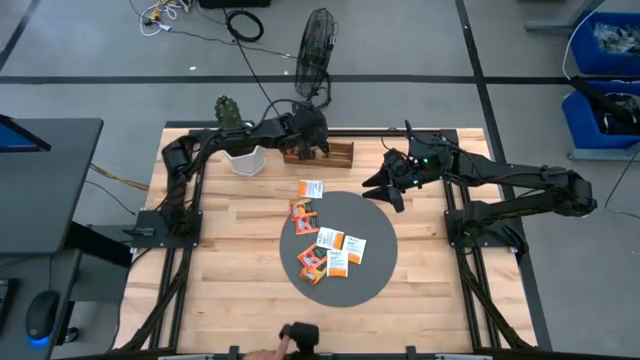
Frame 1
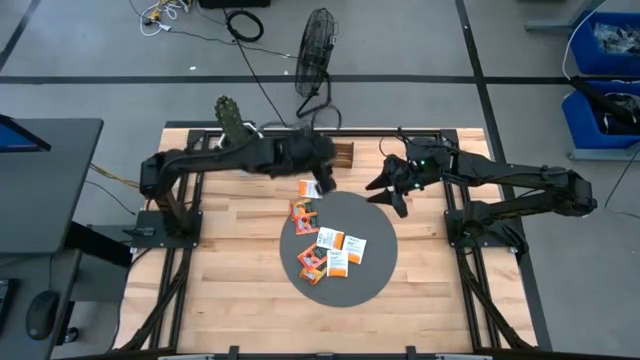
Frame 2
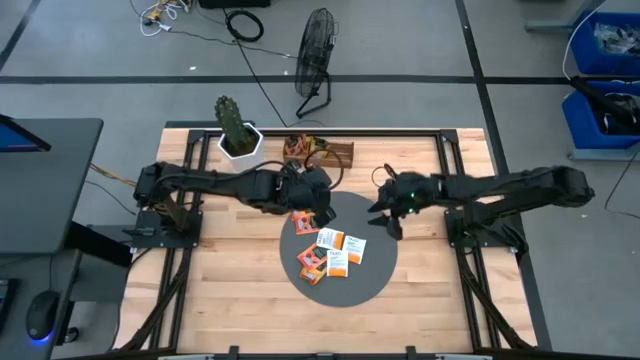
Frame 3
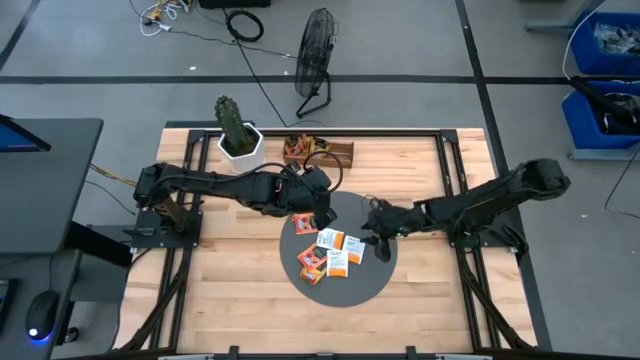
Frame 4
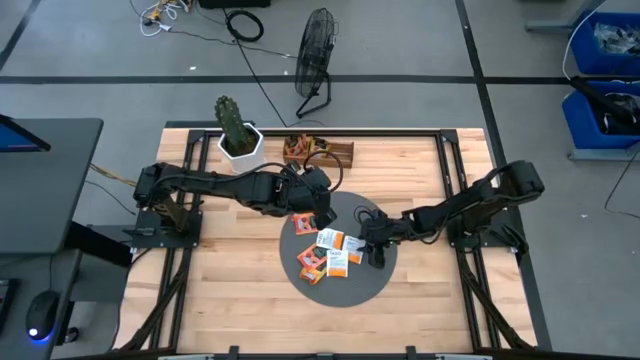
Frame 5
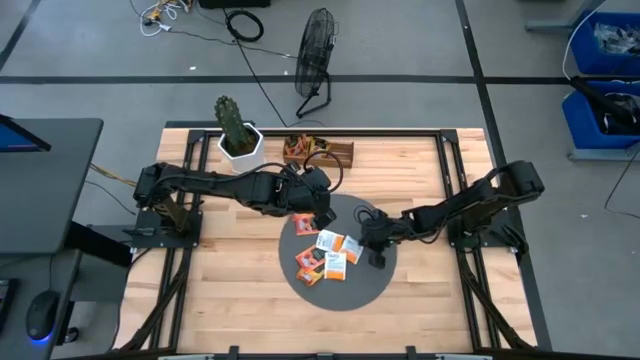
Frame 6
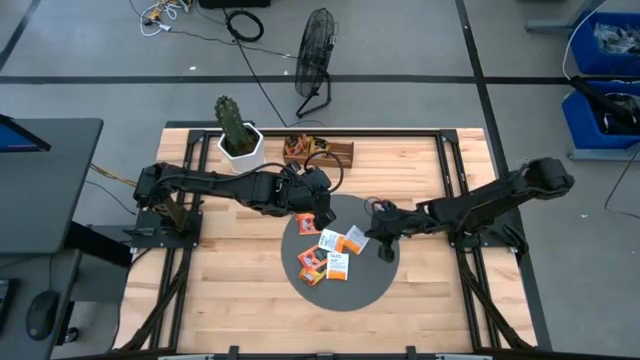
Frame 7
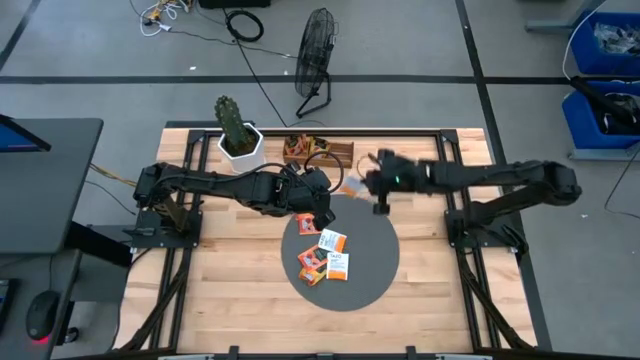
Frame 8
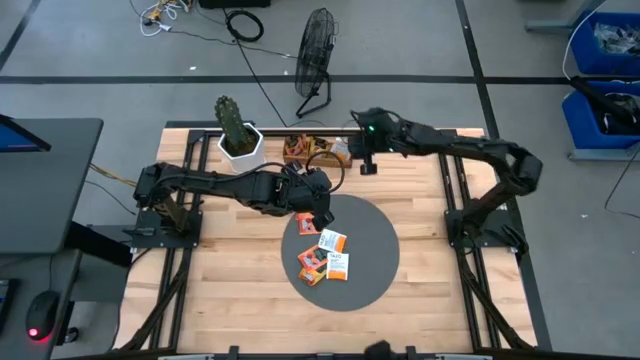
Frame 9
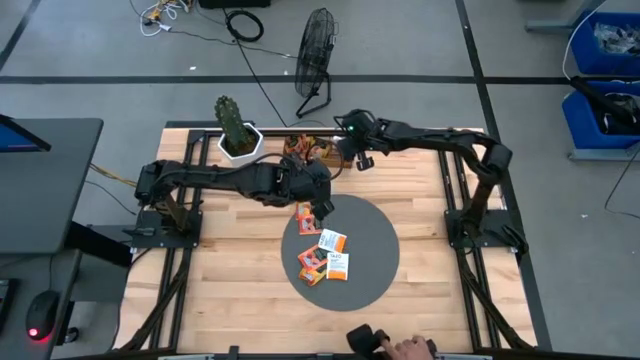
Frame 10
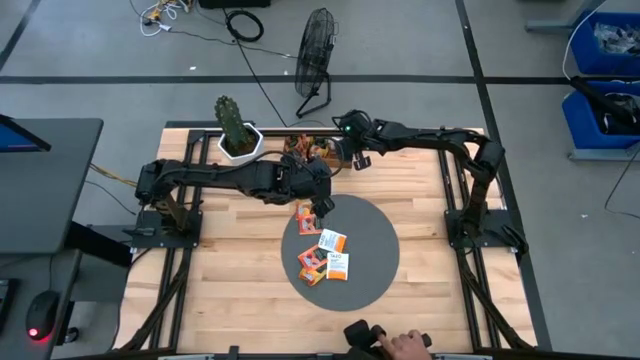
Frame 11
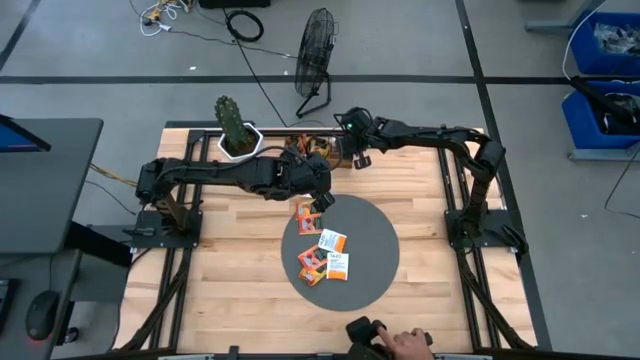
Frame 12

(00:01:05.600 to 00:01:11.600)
Task: Pick & Place Tea
Put the white tea bag into the right section of the wooden organizer

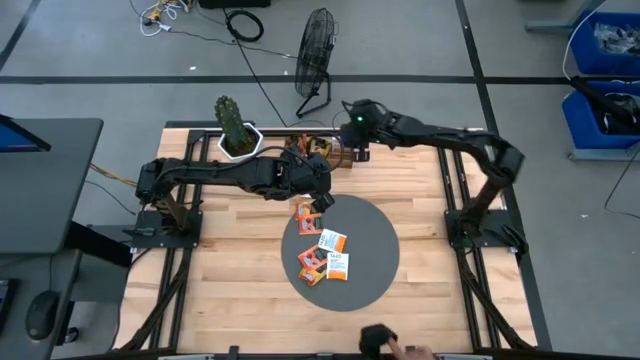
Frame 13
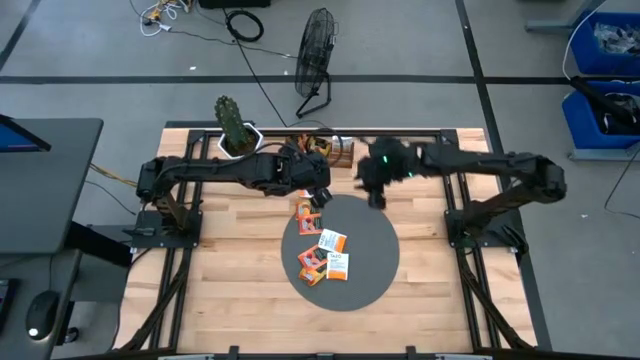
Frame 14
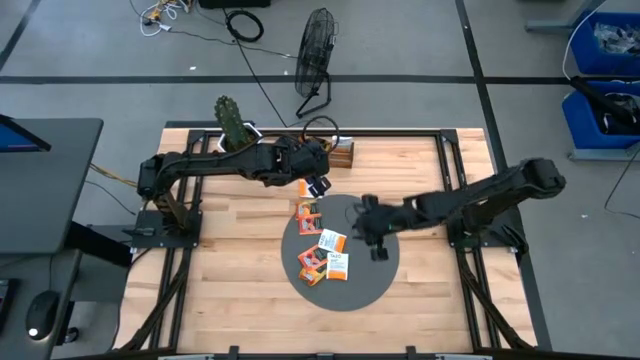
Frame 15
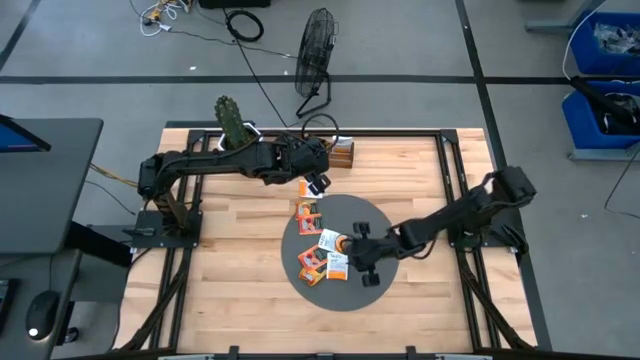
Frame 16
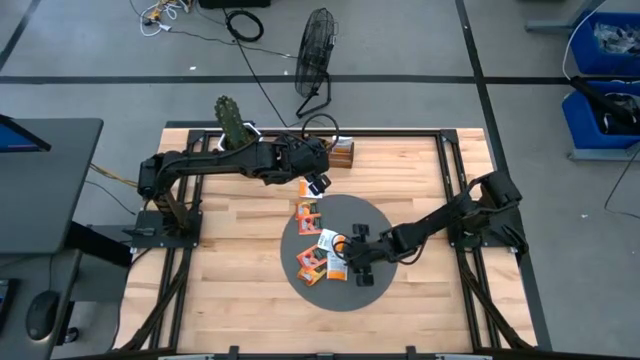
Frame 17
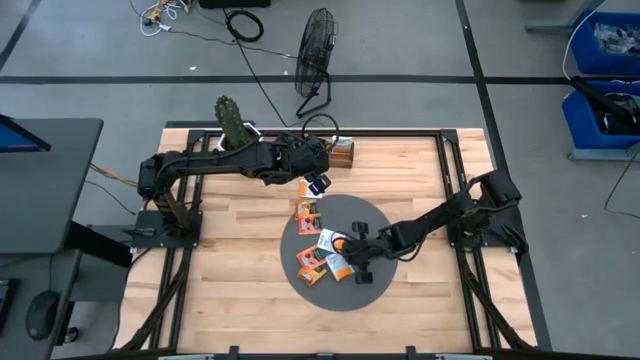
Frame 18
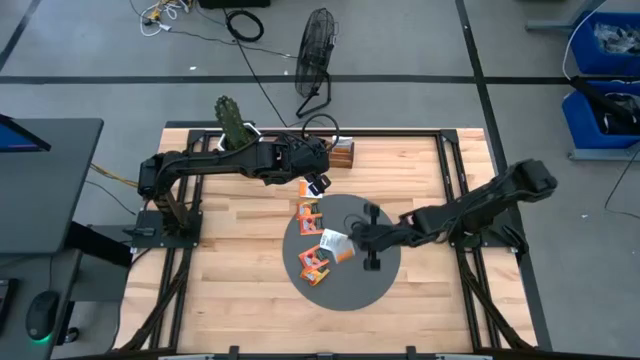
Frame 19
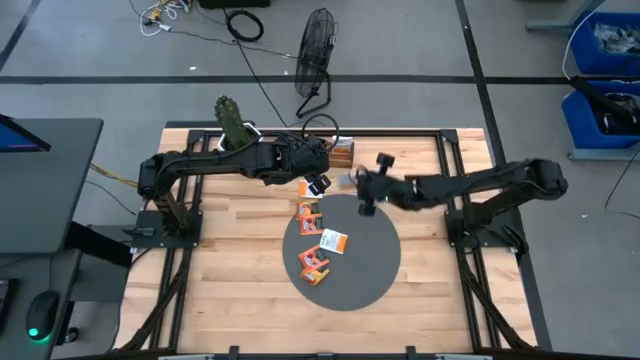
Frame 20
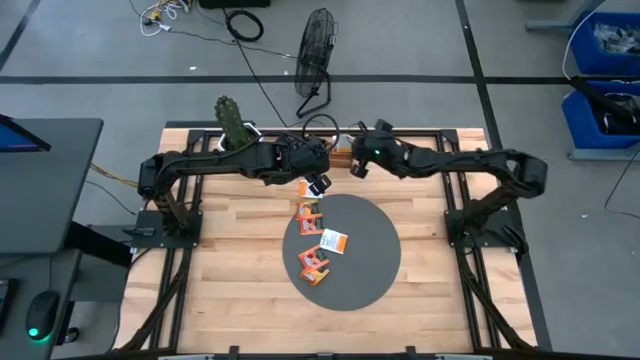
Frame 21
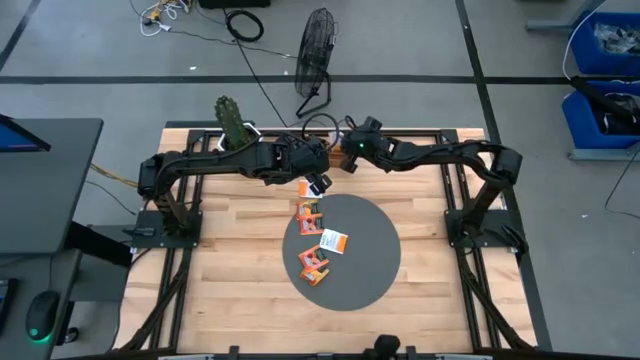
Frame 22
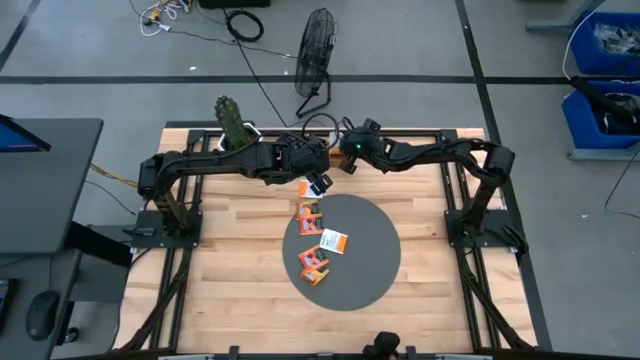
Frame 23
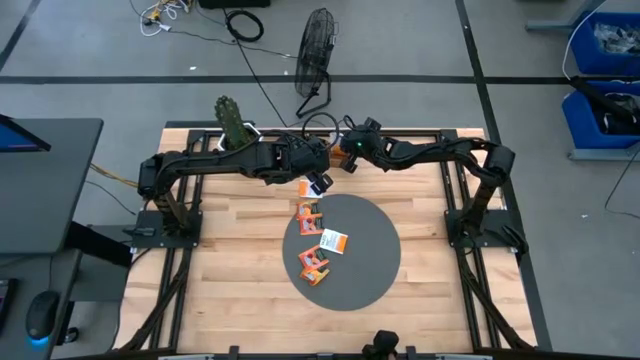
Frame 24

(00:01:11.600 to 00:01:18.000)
Put the white tea bag into the right section of the wooden organizer

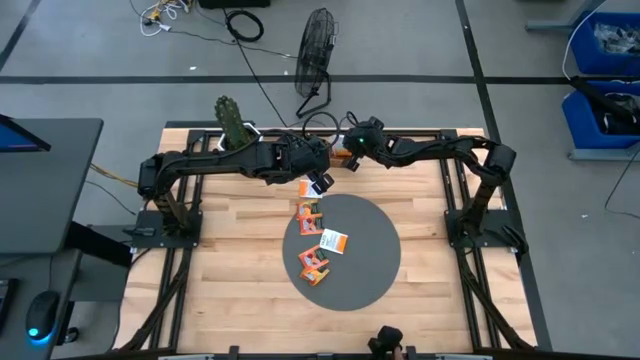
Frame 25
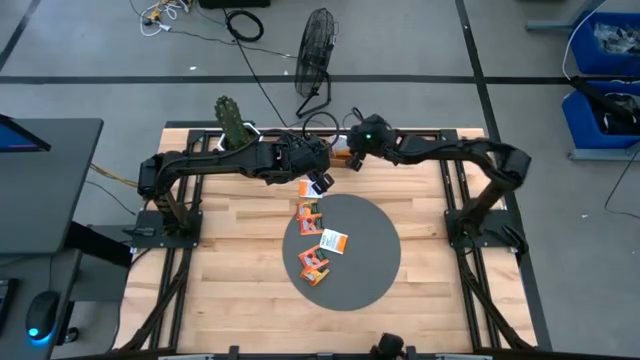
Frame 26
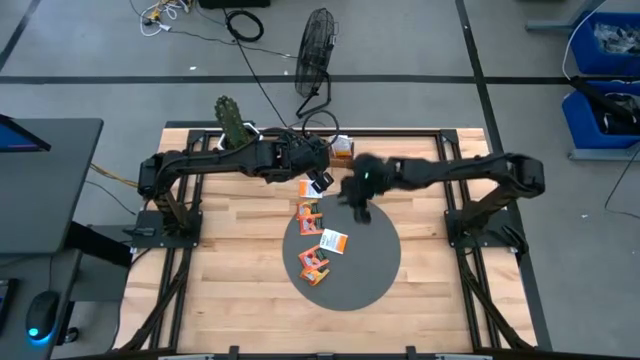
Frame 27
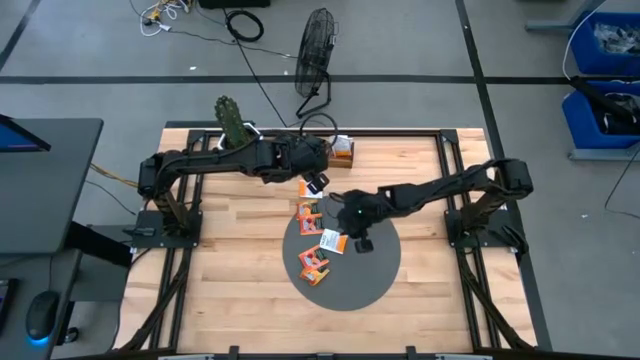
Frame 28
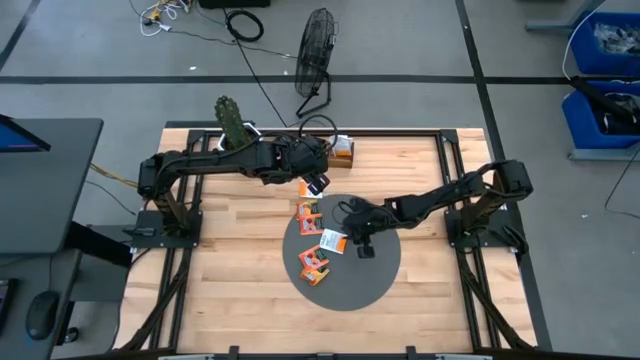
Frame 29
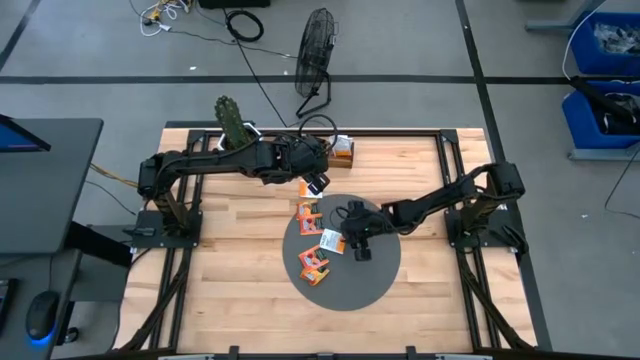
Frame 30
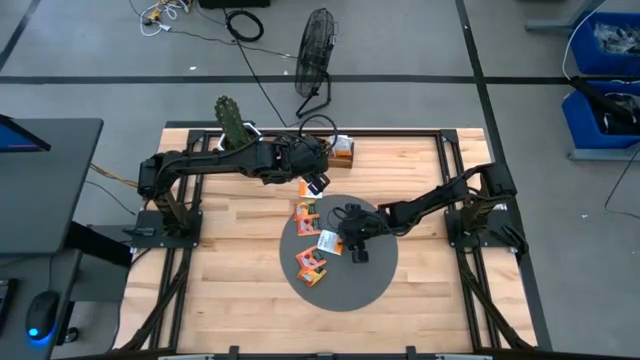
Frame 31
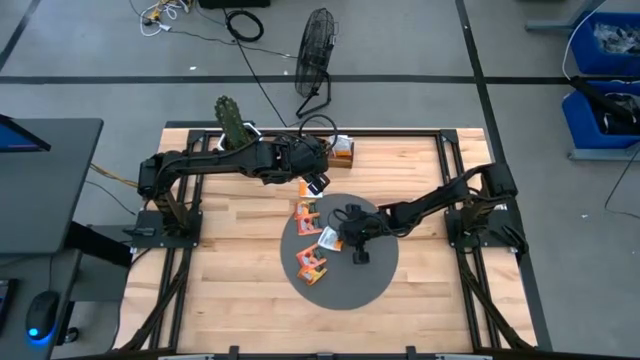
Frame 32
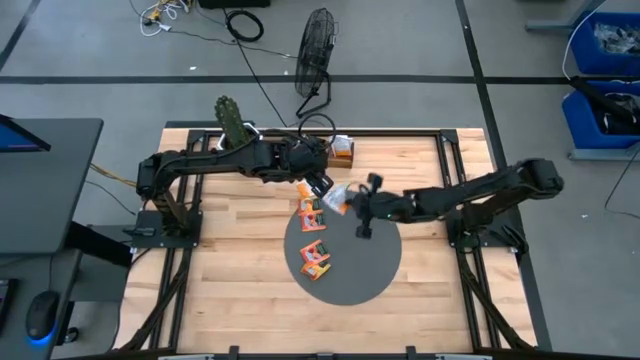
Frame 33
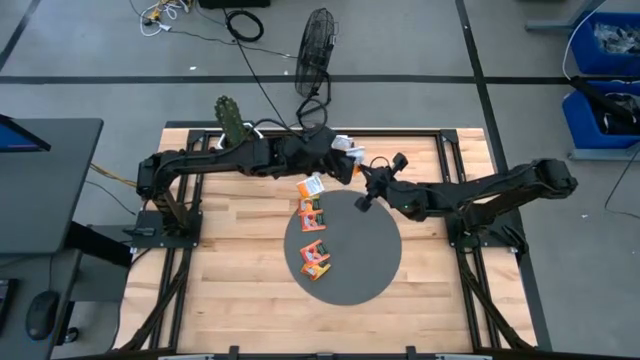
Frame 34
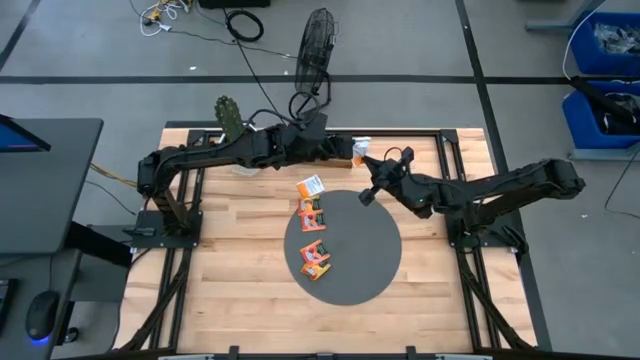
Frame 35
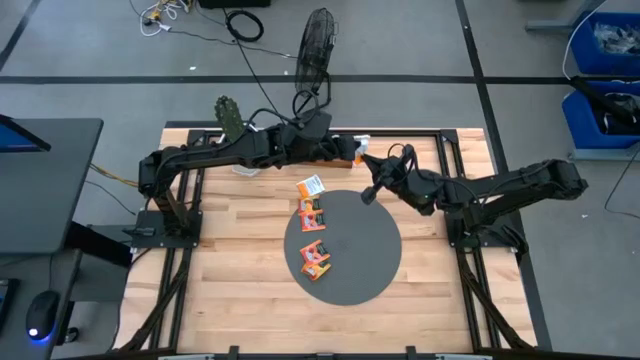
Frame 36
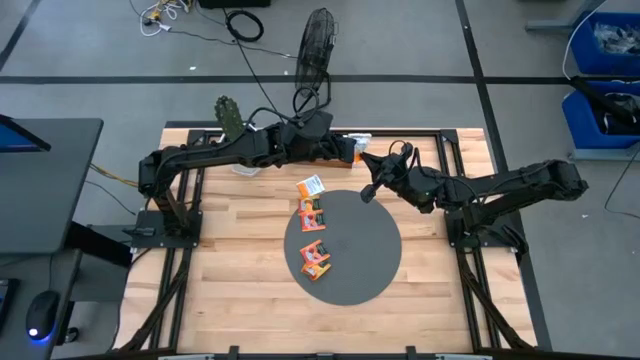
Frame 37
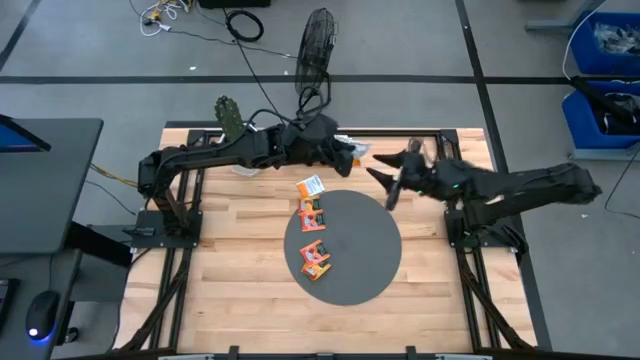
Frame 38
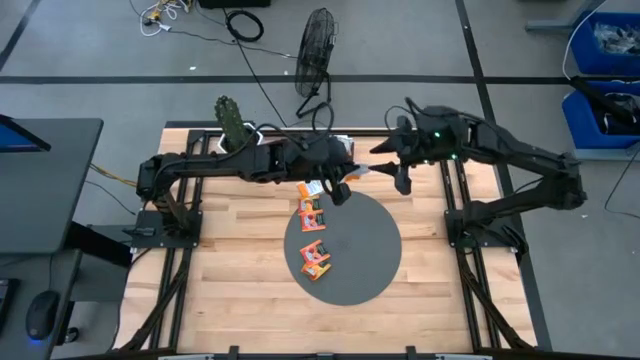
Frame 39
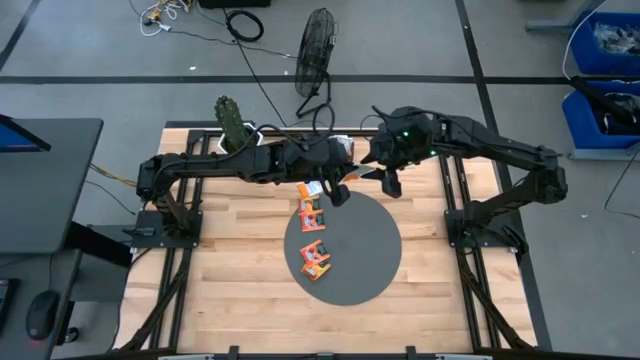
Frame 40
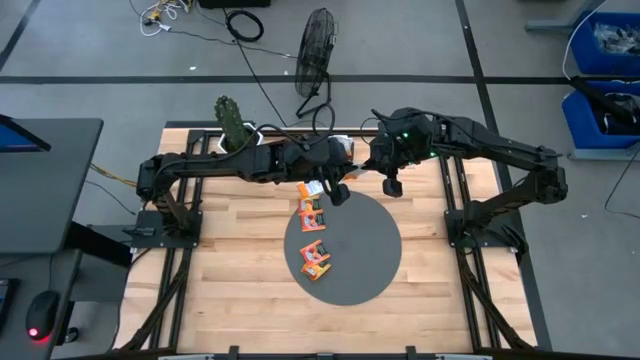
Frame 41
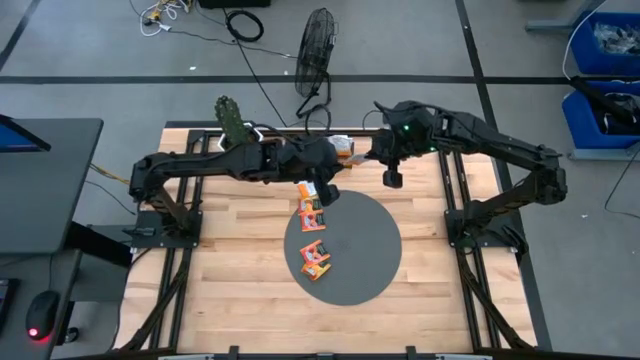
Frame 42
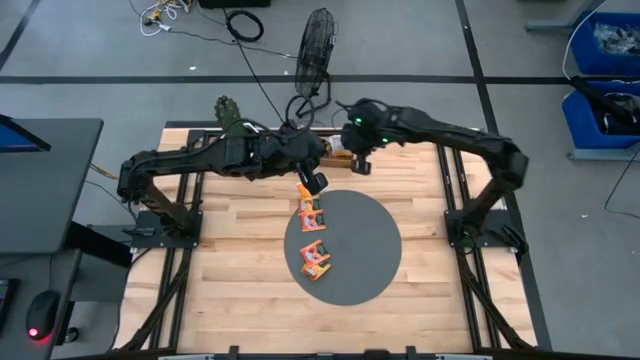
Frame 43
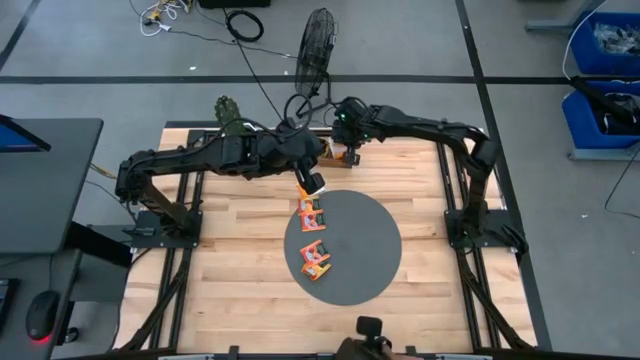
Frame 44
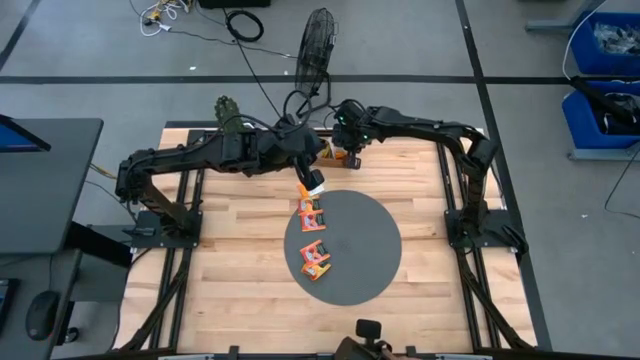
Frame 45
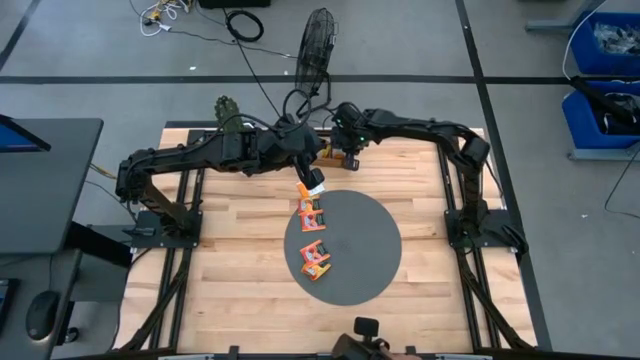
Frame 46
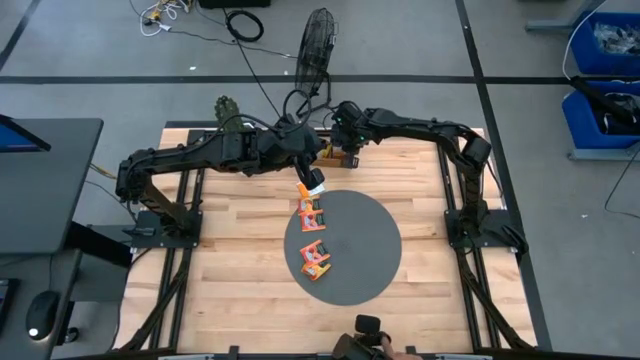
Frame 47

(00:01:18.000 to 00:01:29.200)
Put the white tea bag into the right section of the wooden organizer
